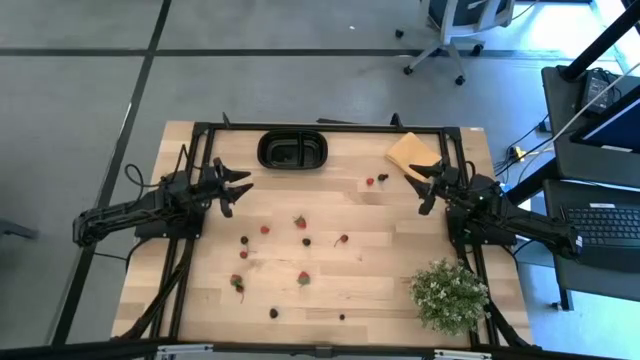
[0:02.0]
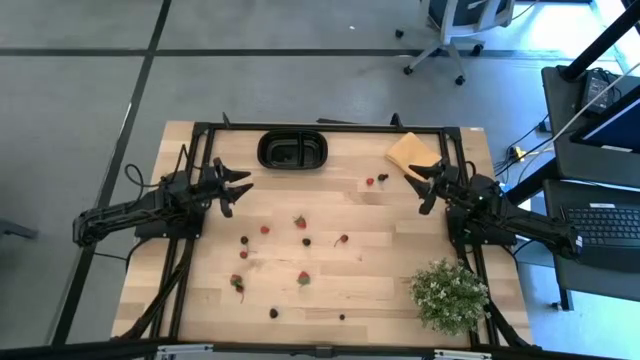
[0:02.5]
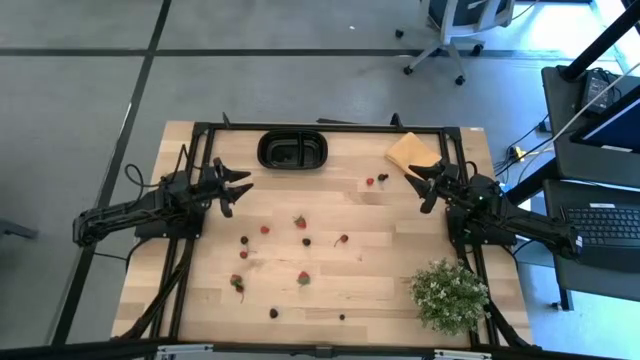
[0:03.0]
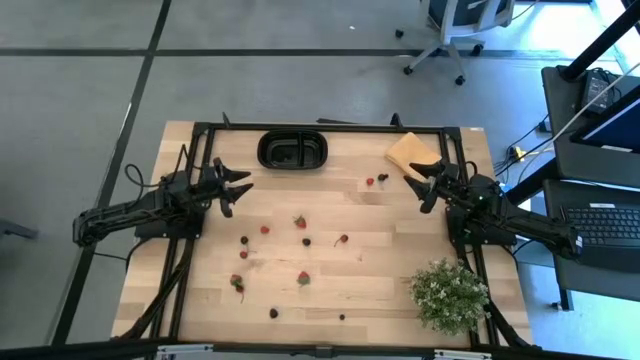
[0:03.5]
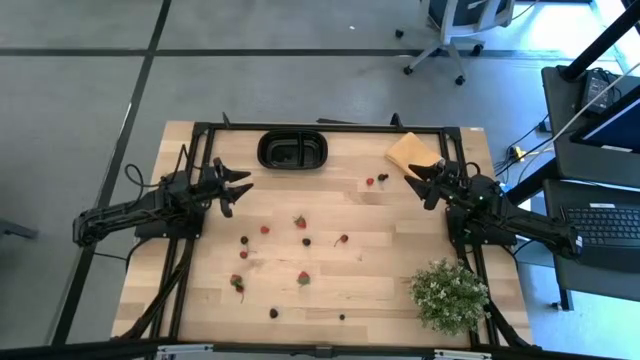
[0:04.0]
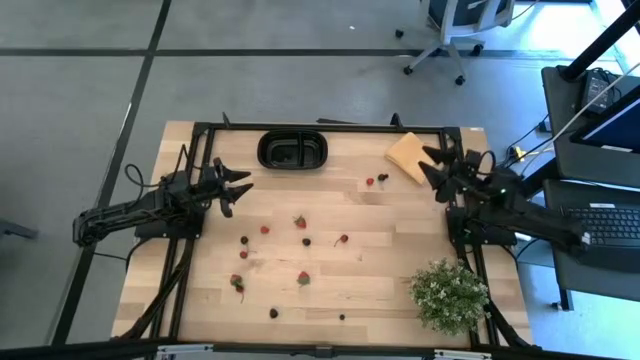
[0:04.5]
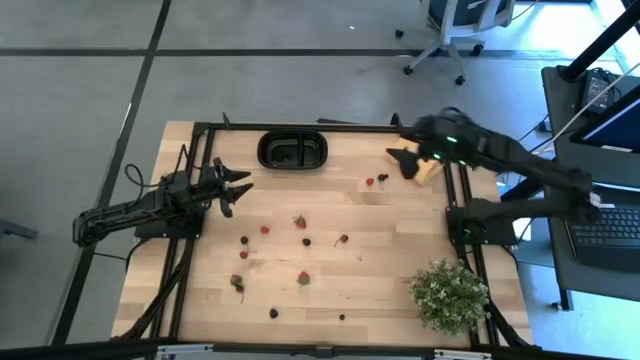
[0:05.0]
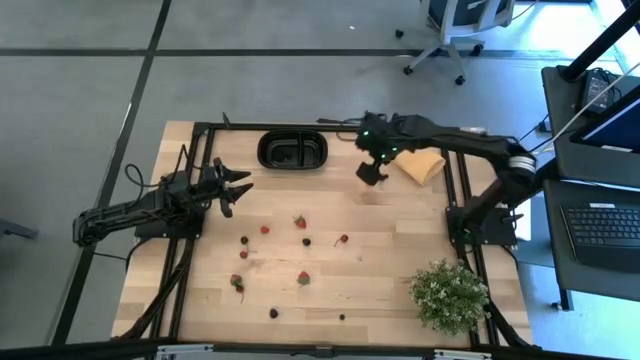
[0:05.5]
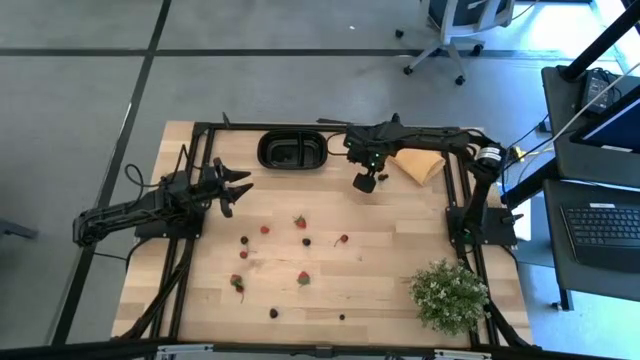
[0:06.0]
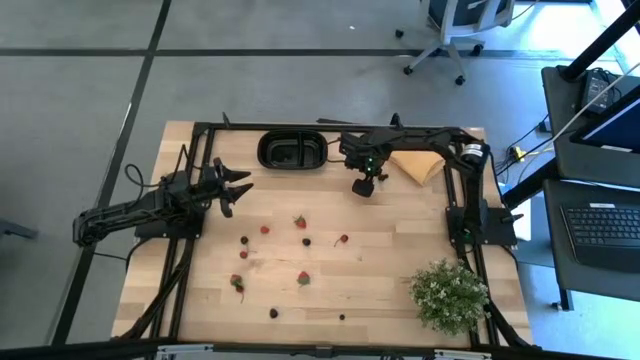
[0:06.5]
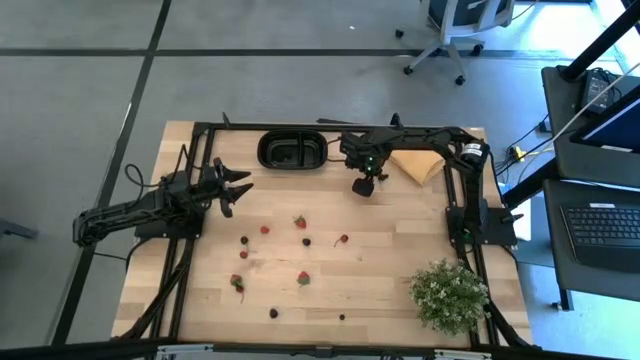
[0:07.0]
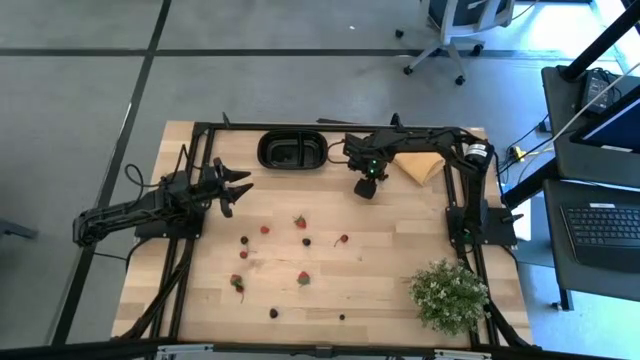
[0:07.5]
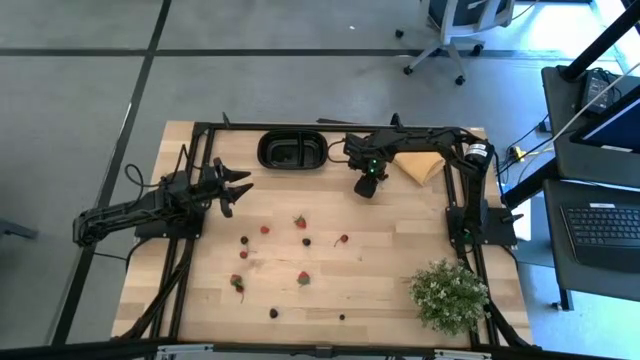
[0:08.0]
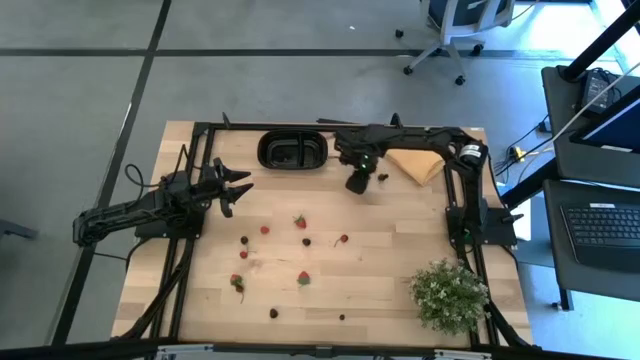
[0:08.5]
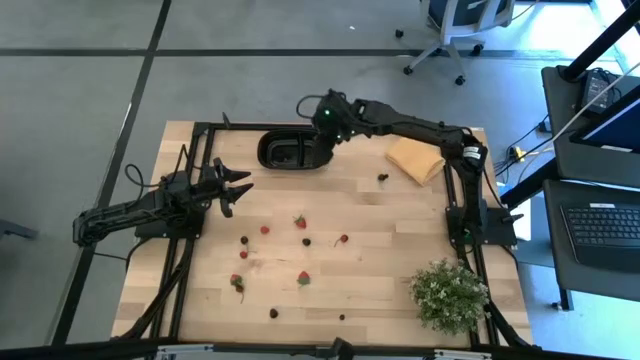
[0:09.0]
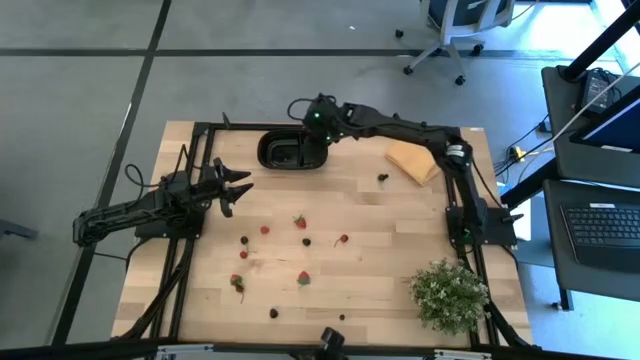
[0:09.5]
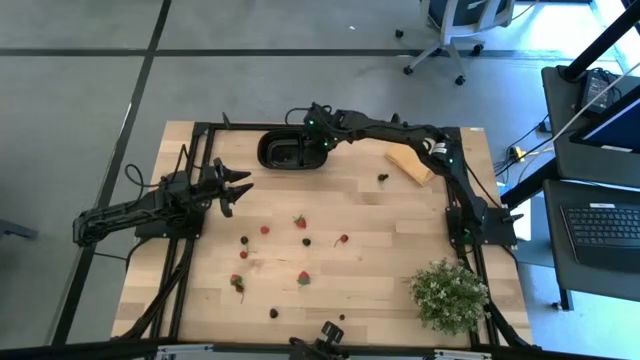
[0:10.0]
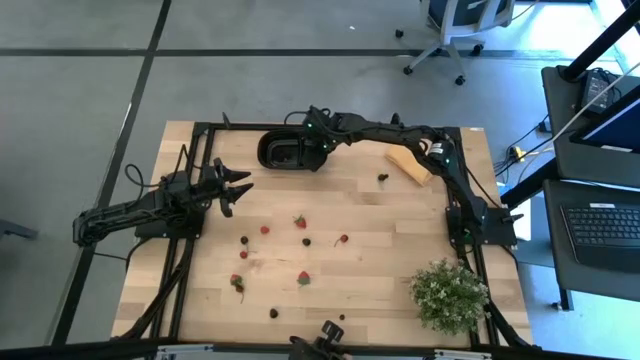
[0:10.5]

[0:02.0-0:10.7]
Task: Pick and placing Produce into tupperware
Put the top raspberry into the black bin

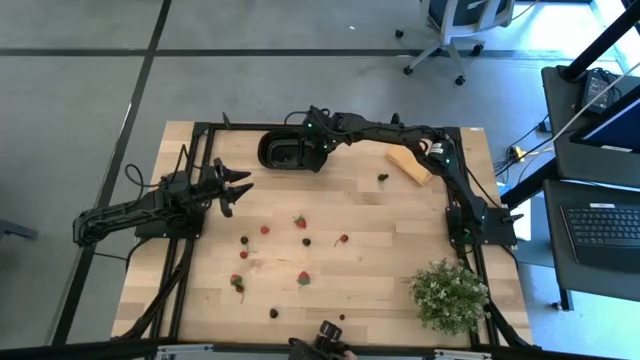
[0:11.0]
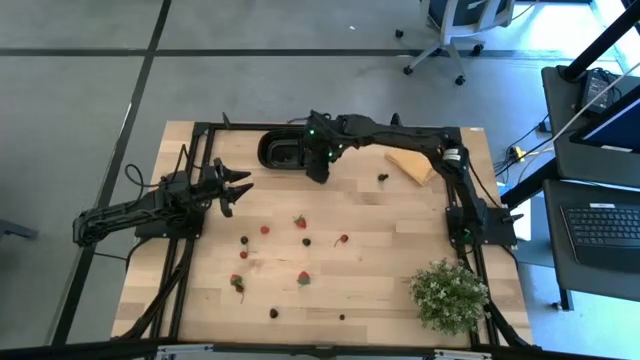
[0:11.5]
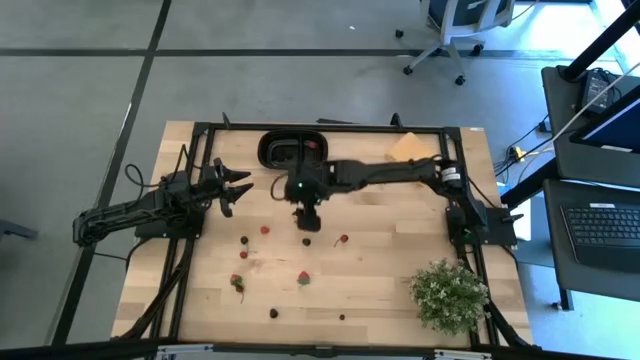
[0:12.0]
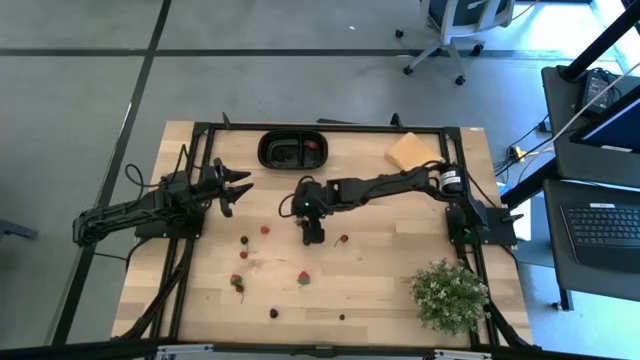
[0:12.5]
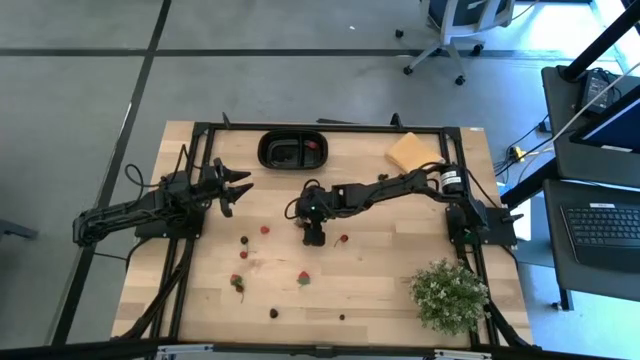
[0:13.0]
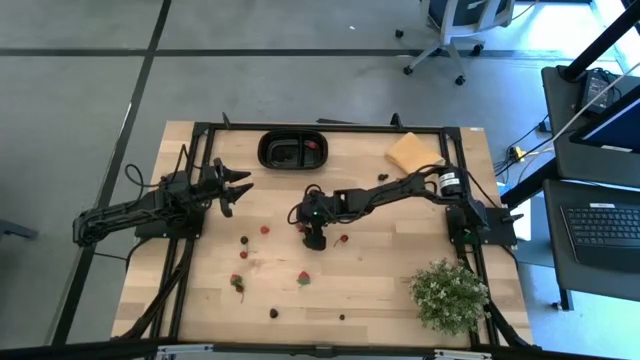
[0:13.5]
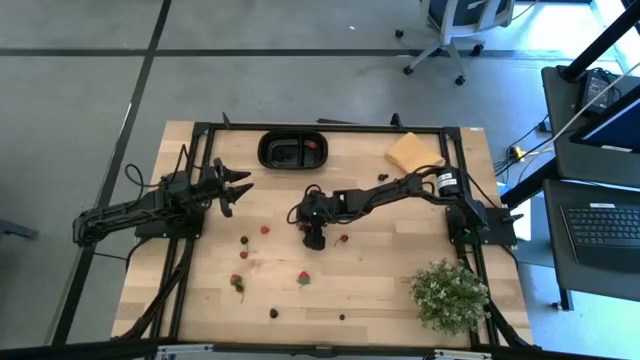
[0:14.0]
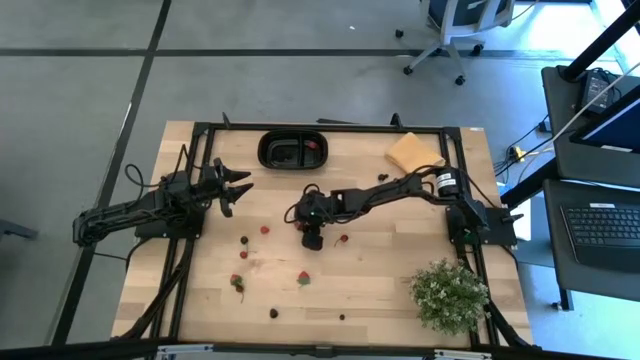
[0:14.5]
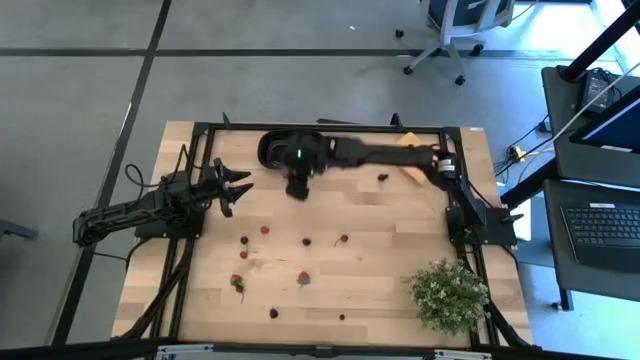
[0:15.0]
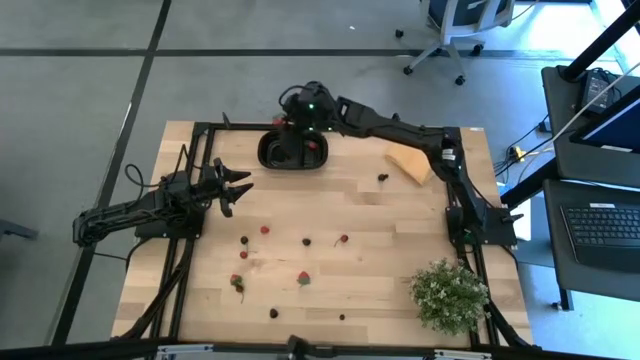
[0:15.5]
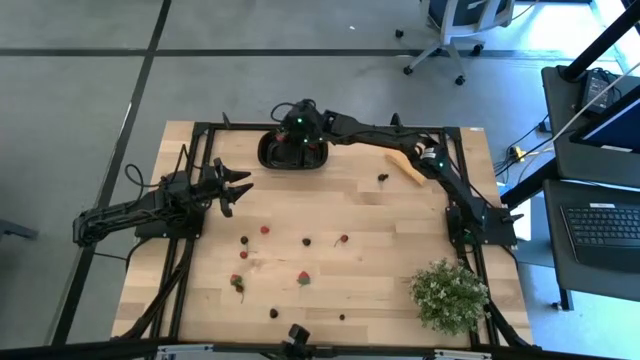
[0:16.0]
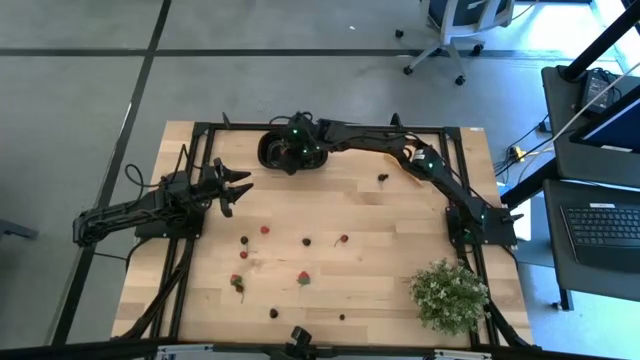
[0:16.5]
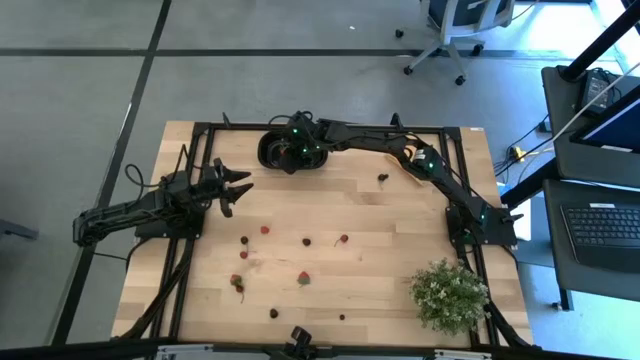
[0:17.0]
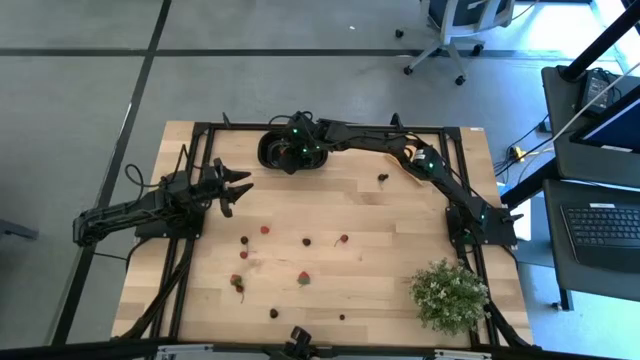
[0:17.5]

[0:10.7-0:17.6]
Put the top strawberry into the black bin

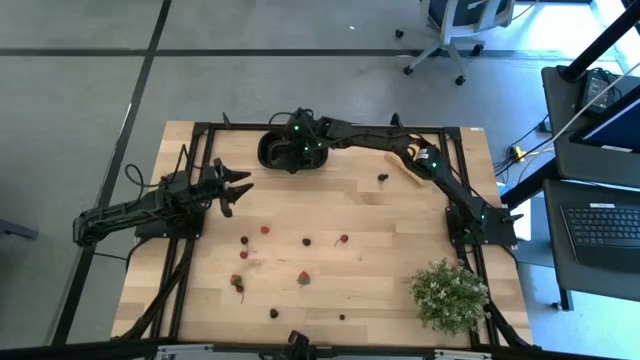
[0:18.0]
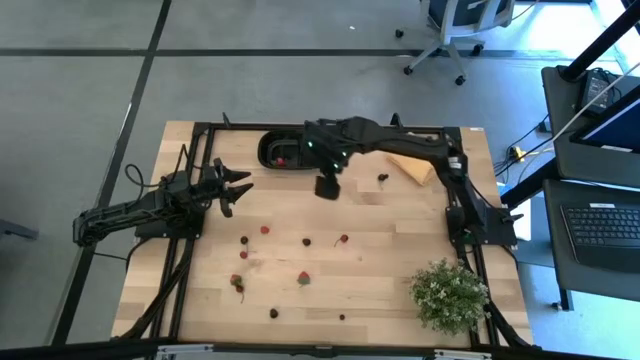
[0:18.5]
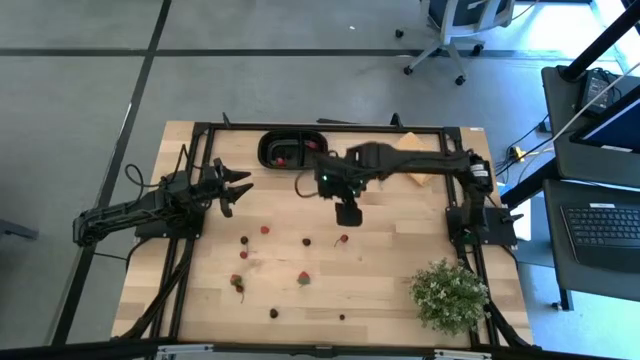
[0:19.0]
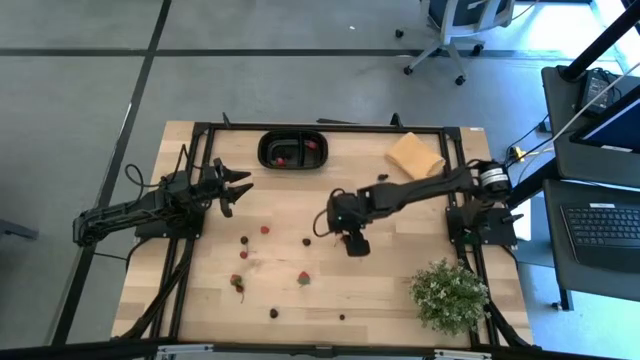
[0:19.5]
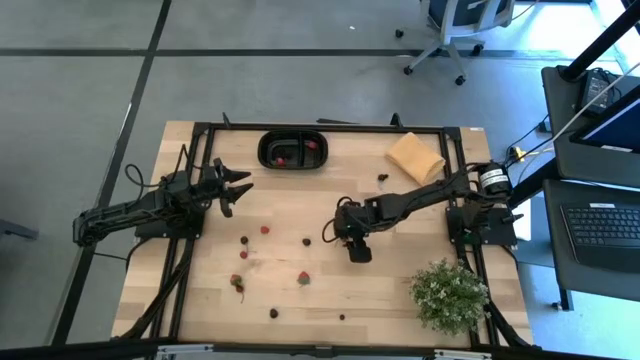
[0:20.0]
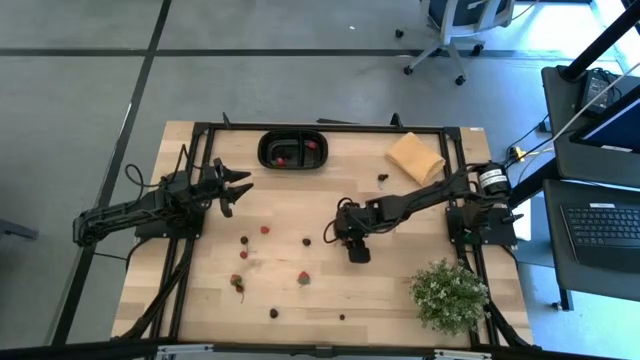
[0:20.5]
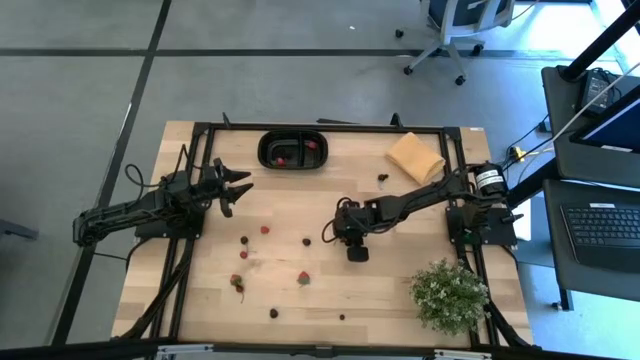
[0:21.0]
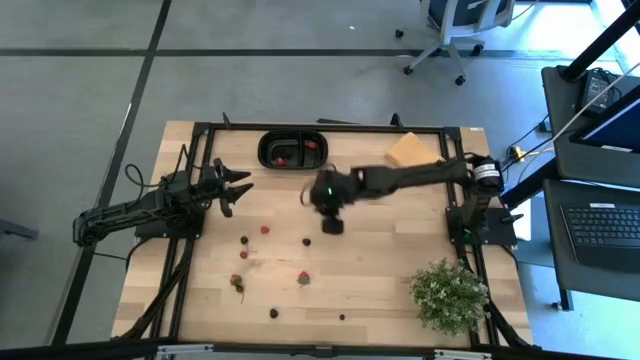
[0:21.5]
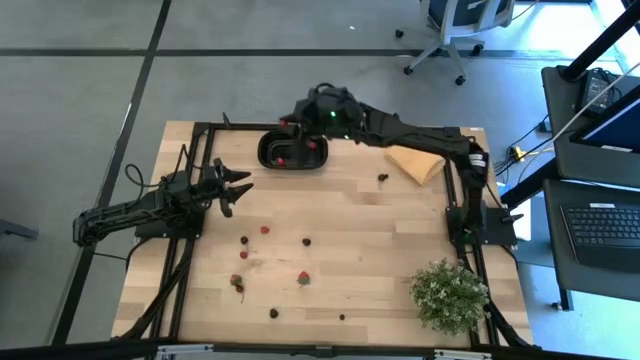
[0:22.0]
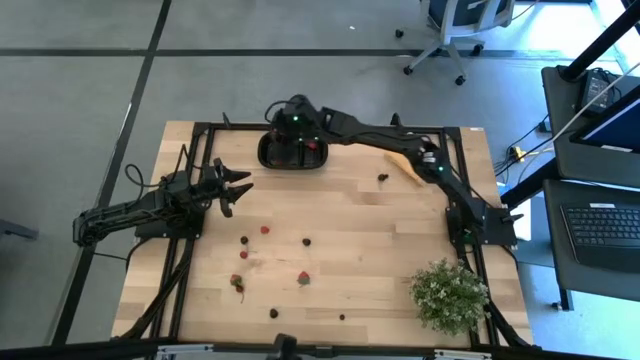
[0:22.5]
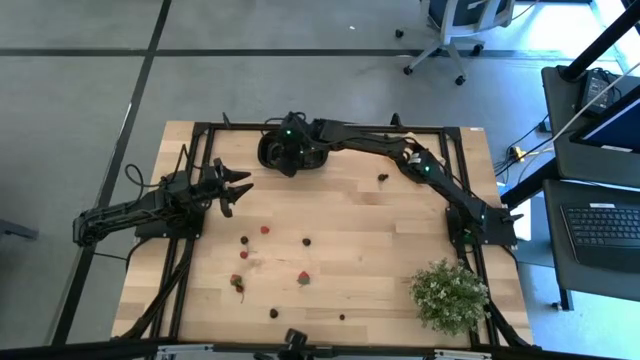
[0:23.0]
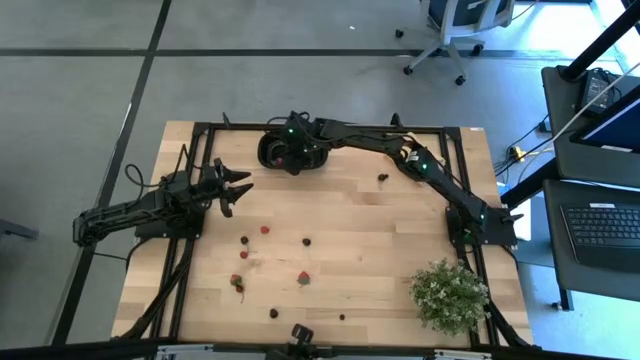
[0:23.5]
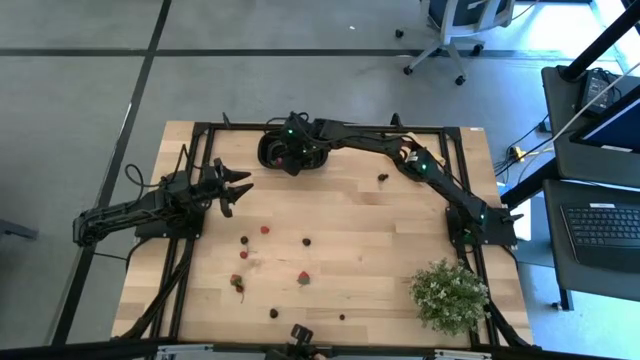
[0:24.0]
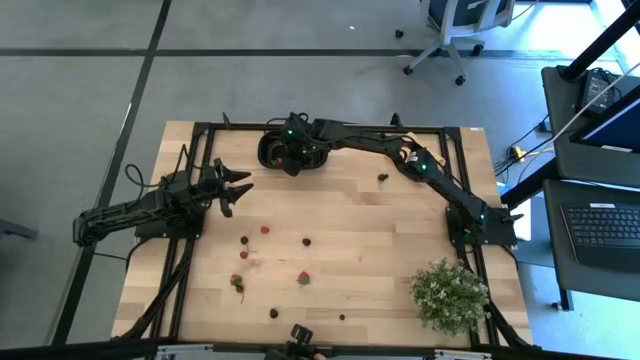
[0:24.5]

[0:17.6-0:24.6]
Put the right red cherry into the black bin
